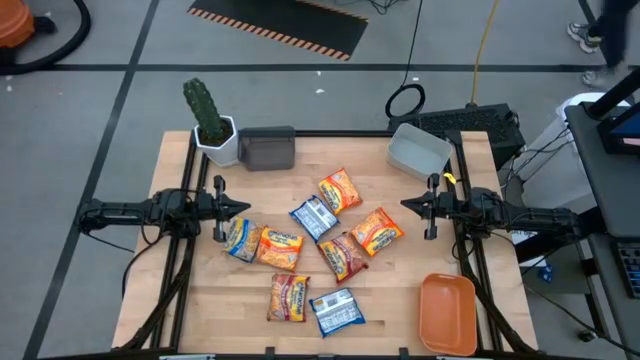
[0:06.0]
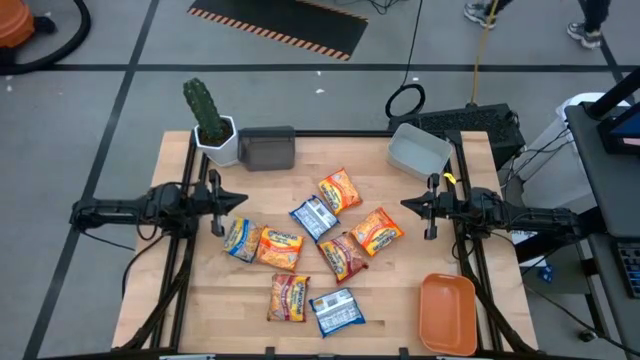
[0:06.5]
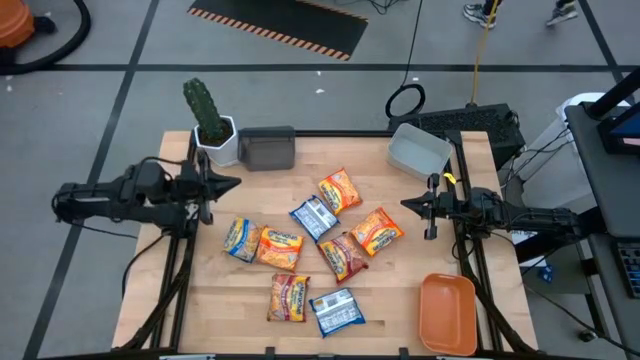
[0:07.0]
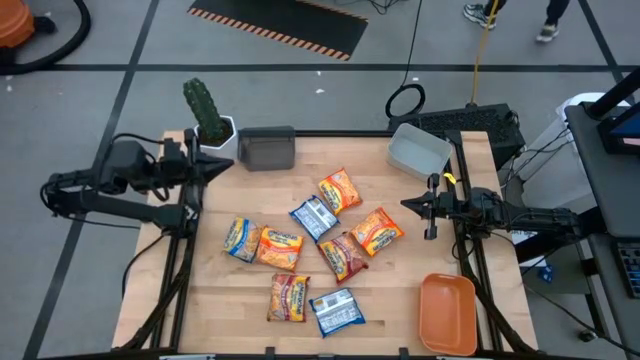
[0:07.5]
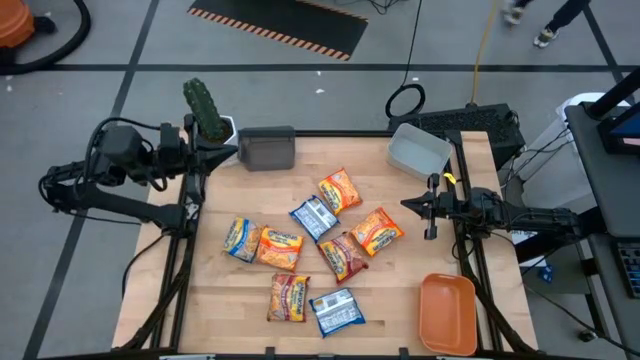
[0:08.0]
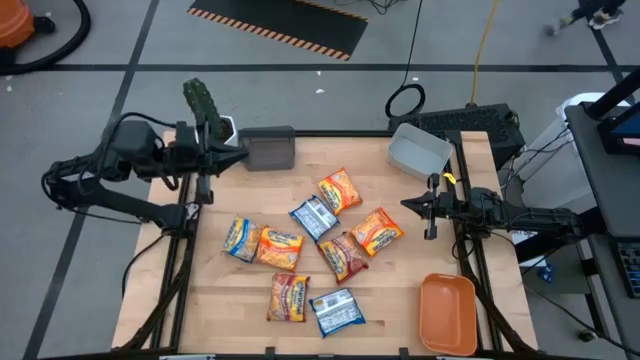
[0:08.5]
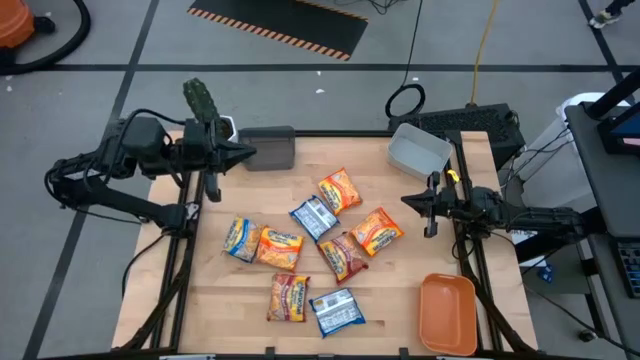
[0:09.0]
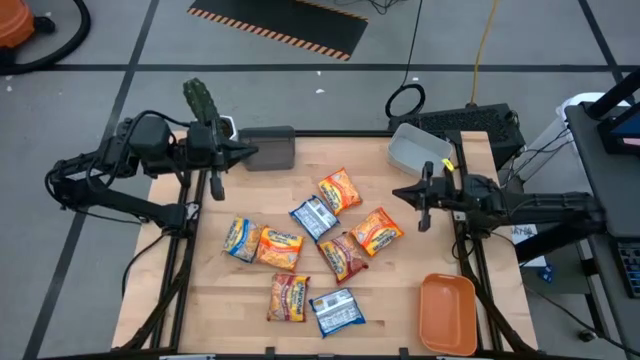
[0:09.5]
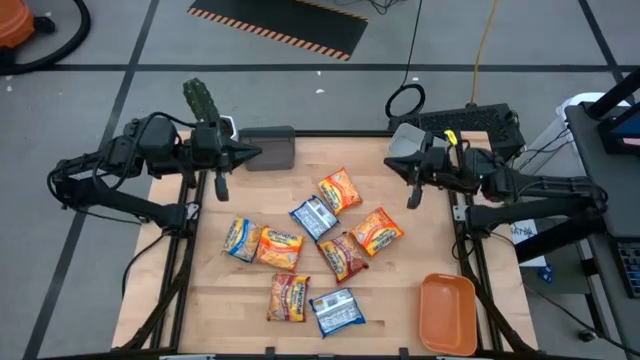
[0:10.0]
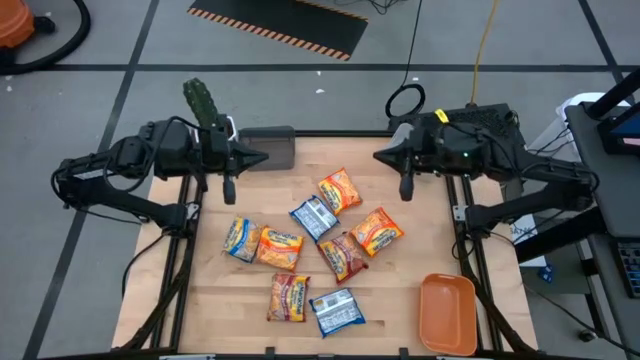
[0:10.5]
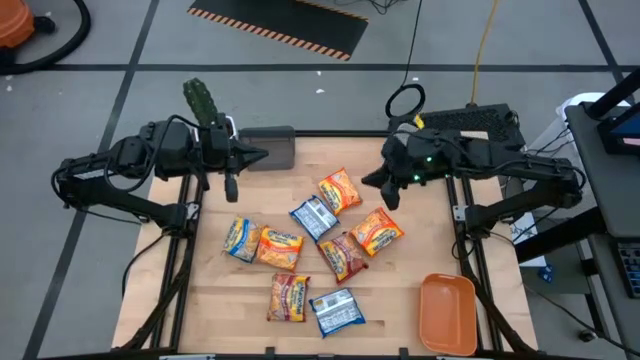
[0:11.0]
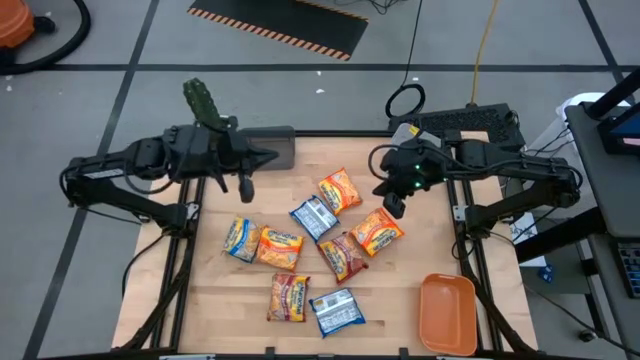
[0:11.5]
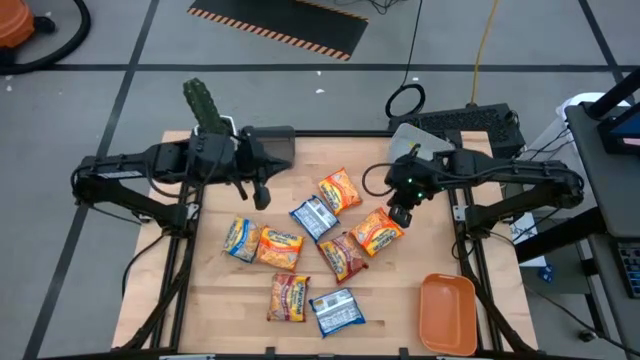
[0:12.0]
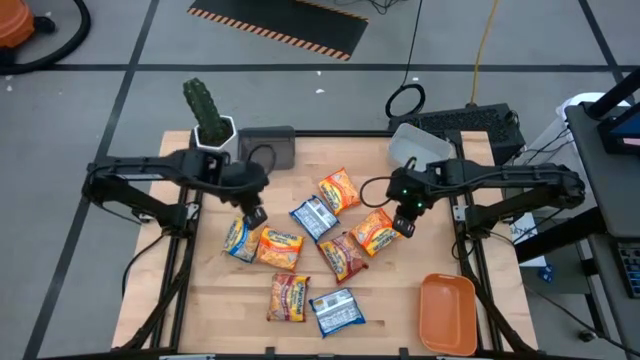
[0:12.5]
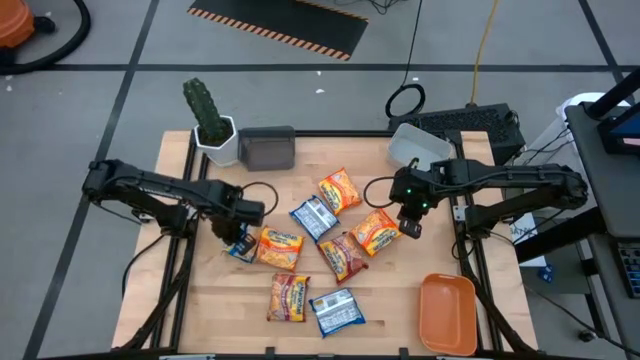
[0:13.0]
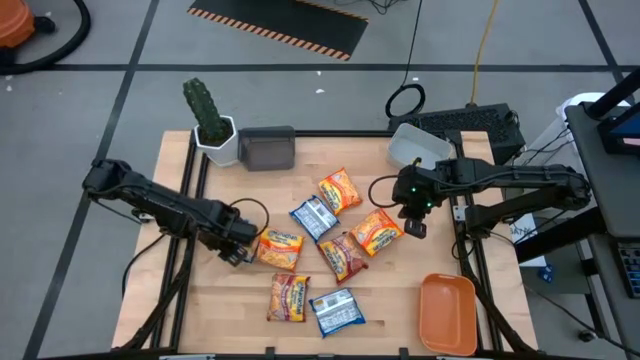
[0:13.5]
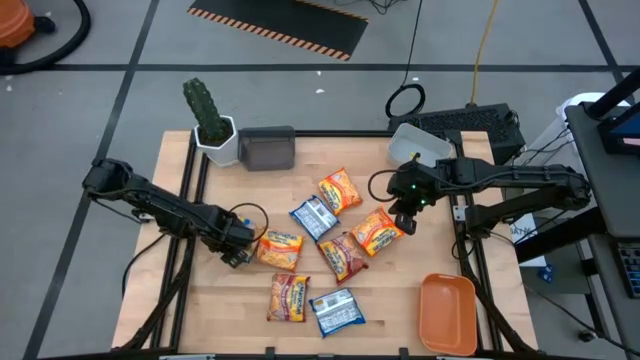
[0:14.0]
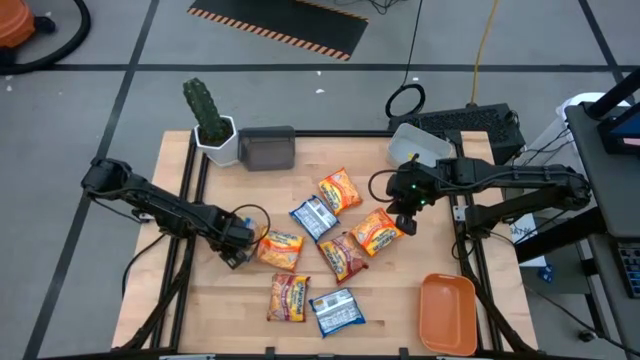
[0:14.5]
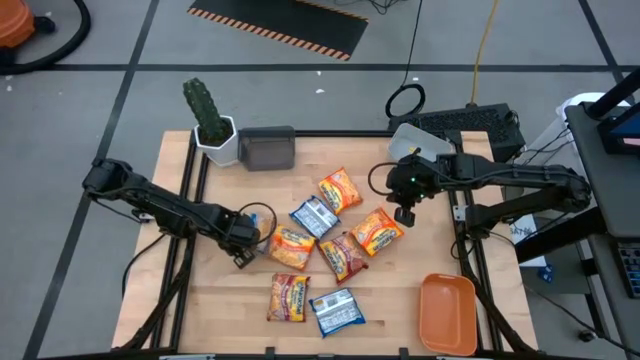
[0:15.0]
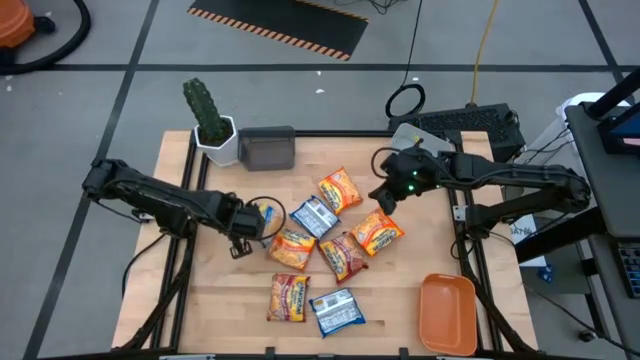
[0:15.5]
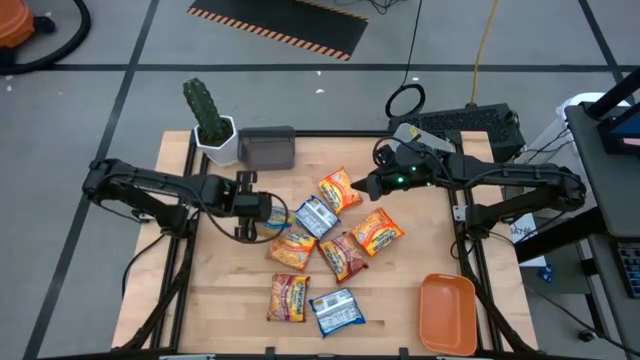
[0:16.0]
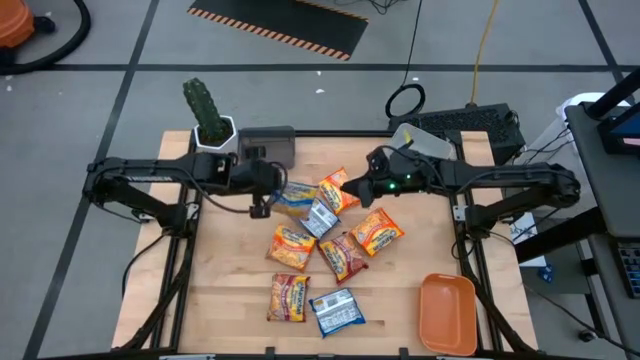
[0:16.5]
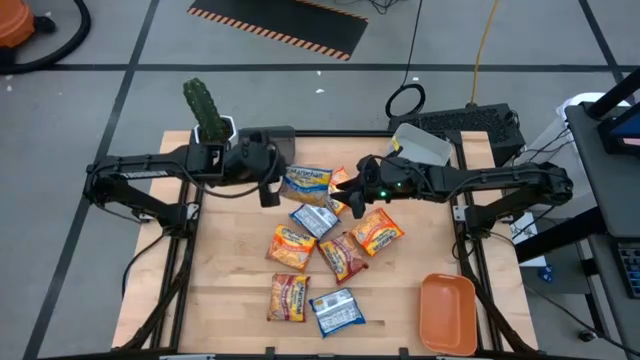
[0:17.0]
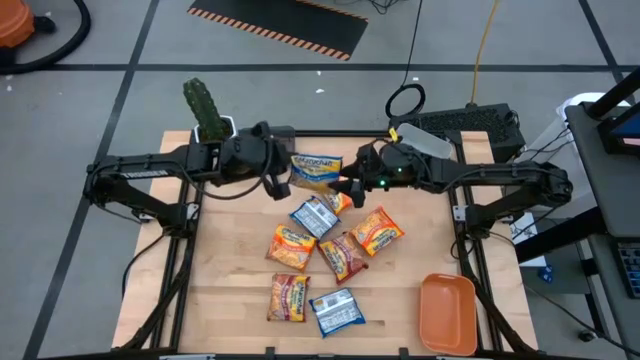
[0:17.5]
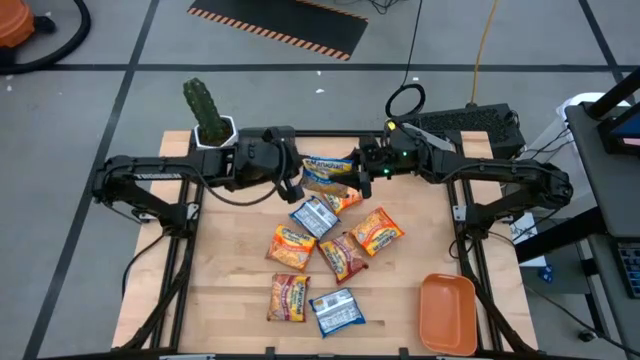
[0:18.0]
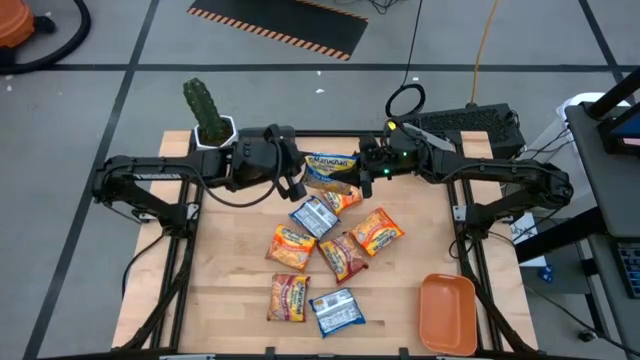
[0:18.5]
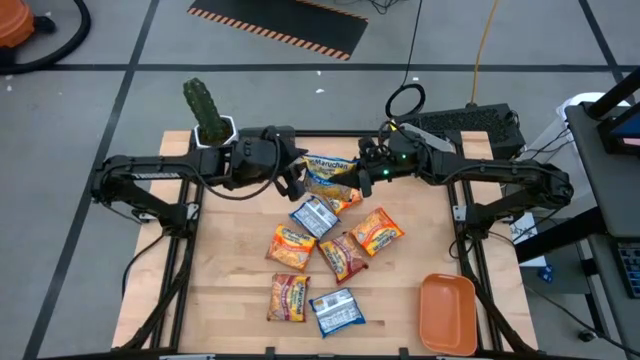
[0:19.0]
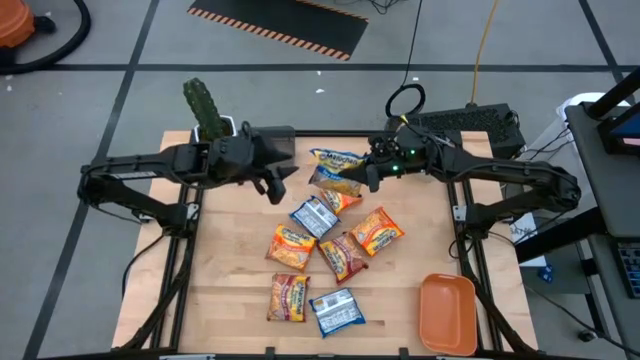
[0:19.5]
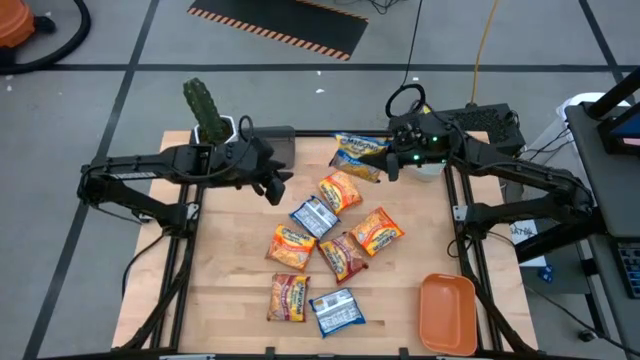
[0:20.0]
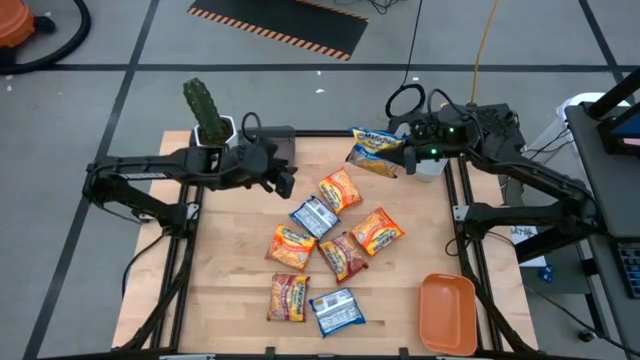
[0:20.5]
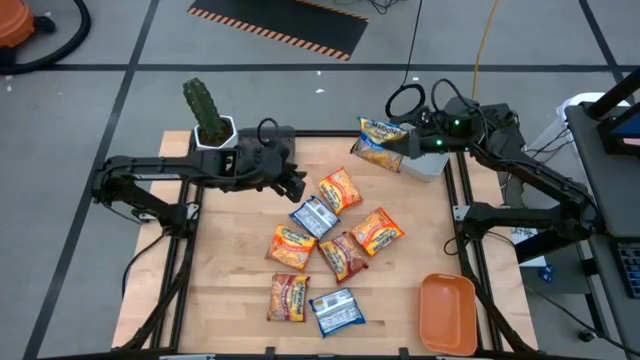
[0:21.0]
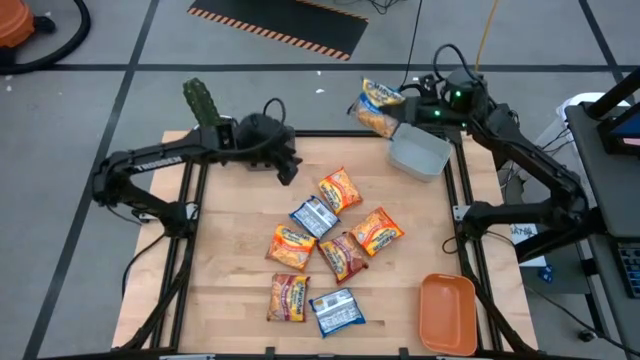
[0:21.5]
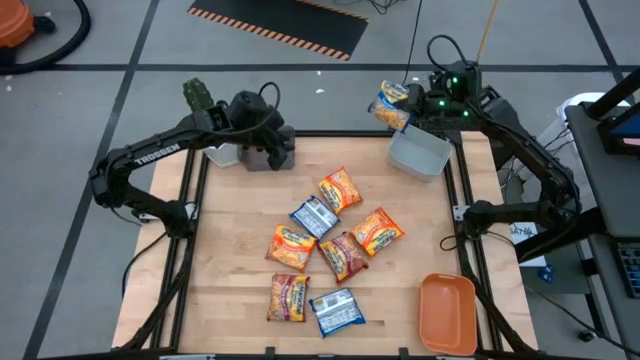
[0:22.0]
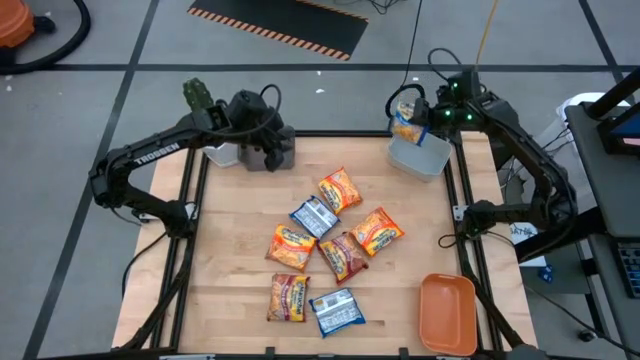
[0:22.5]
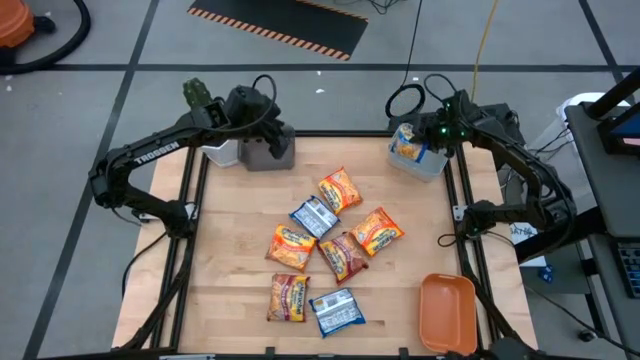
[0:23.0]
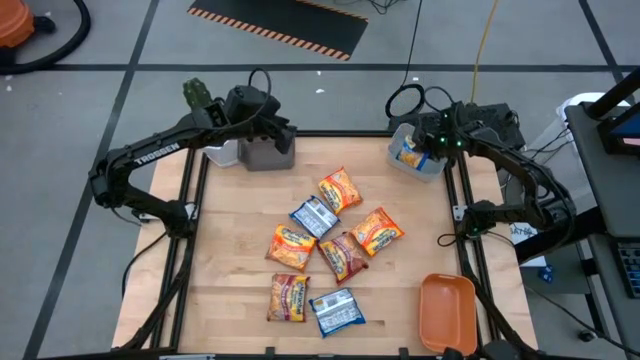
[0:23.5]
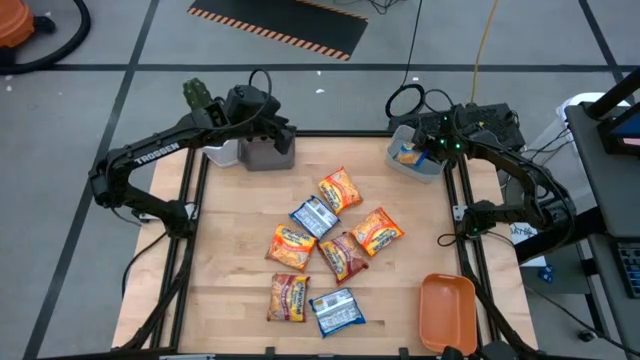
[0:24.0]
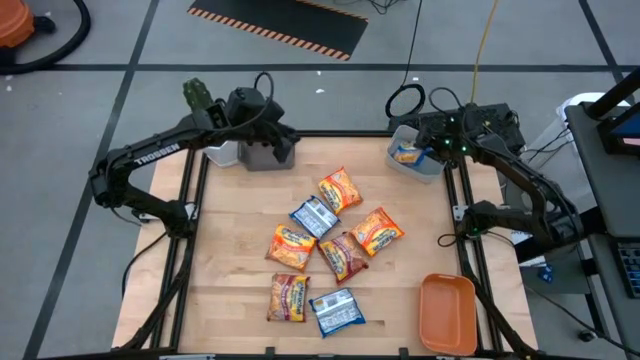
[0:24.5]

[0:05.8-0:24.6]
Task: Sort Maruchan noodles
Put the left blue noodle pack into the gray bin
